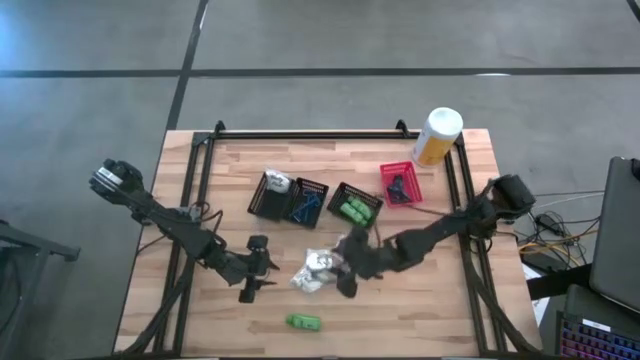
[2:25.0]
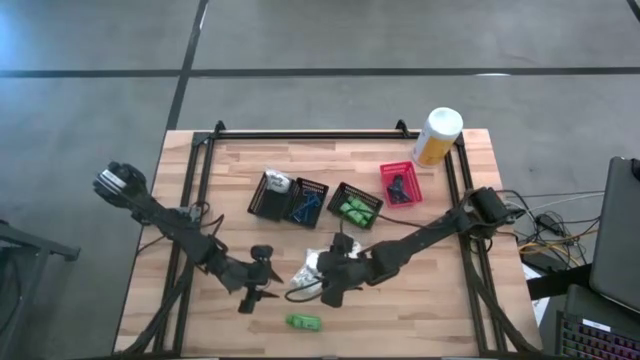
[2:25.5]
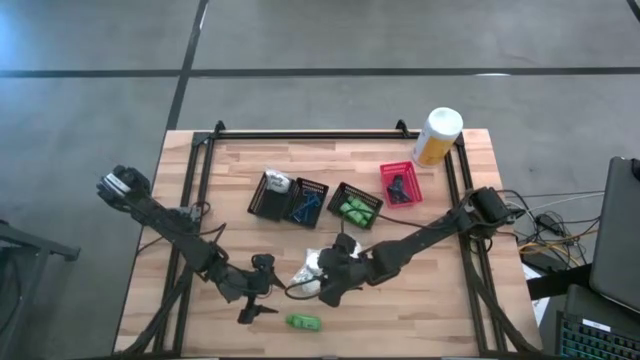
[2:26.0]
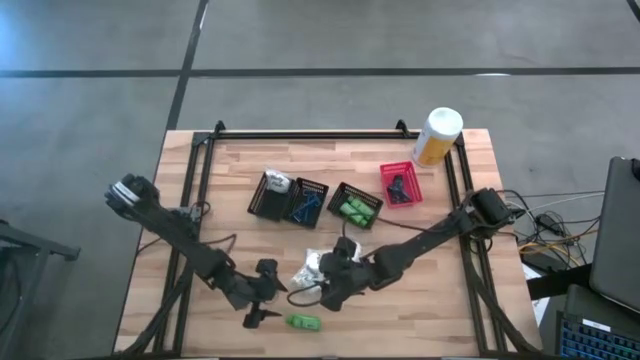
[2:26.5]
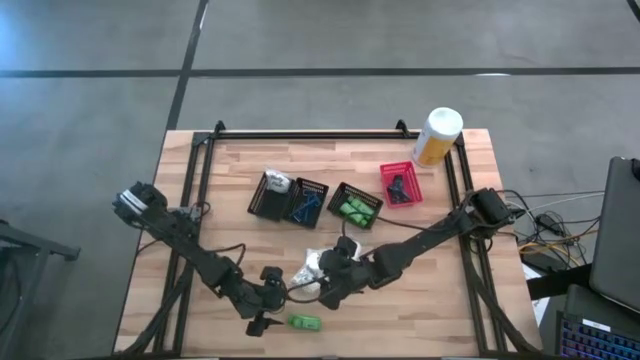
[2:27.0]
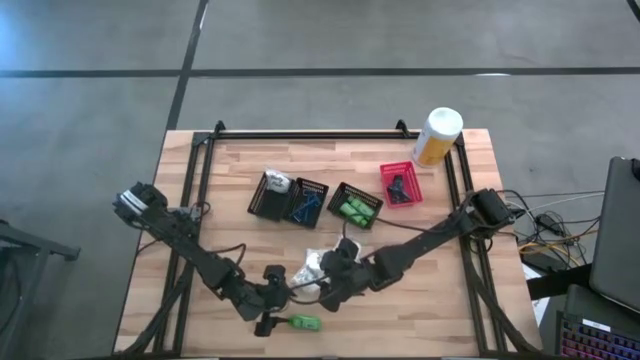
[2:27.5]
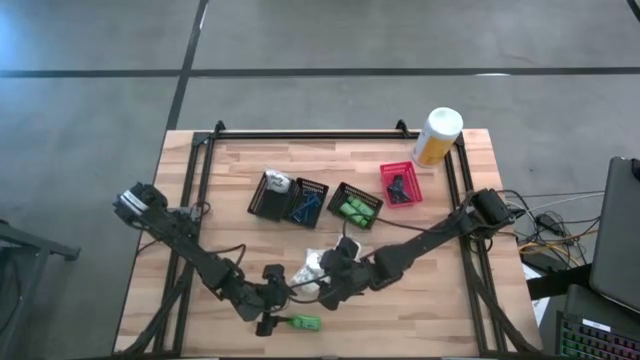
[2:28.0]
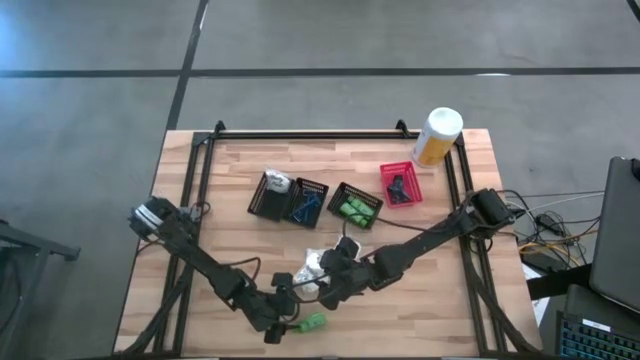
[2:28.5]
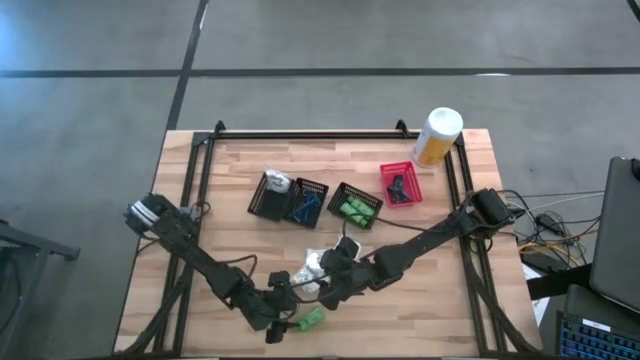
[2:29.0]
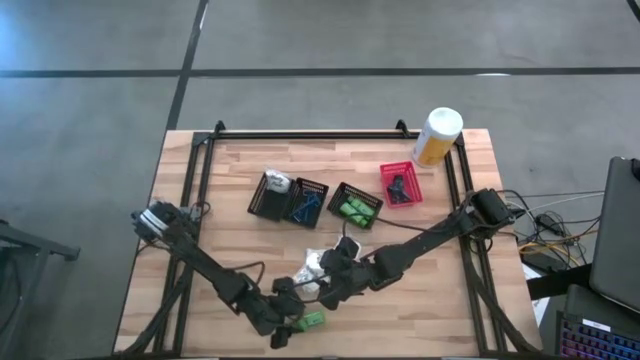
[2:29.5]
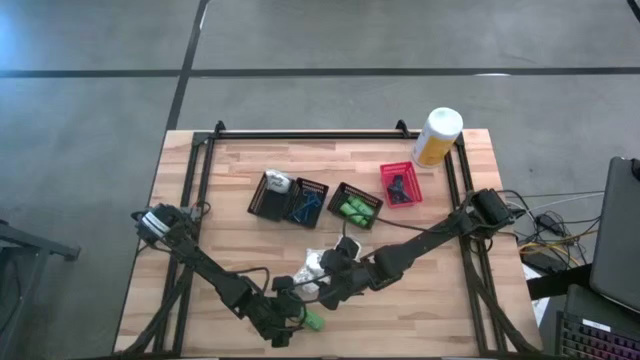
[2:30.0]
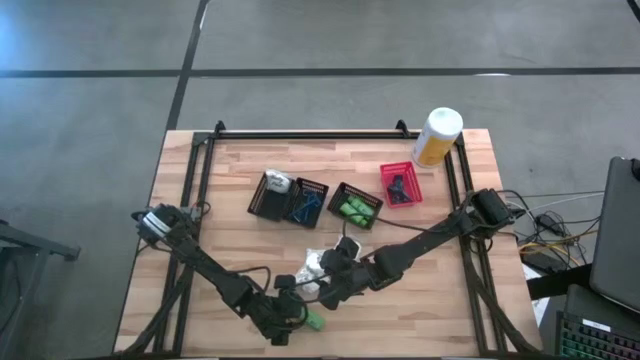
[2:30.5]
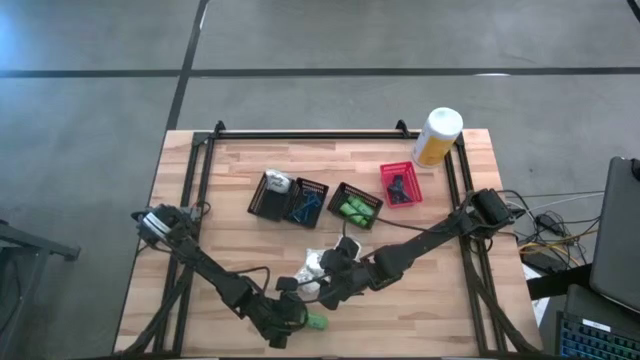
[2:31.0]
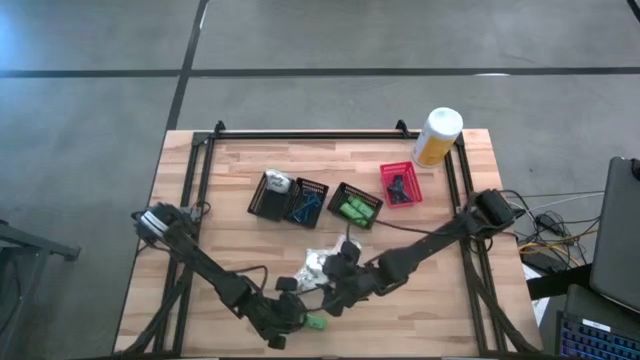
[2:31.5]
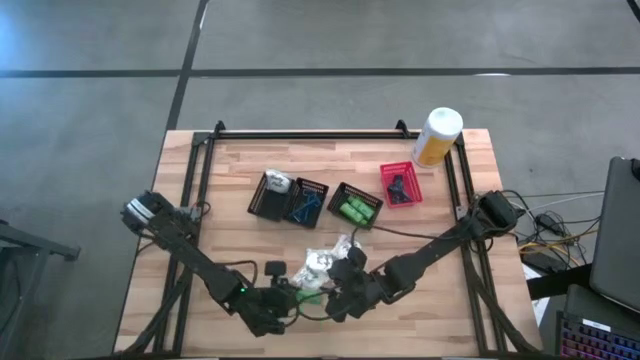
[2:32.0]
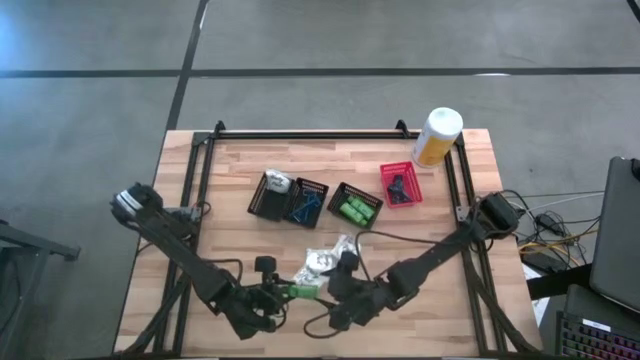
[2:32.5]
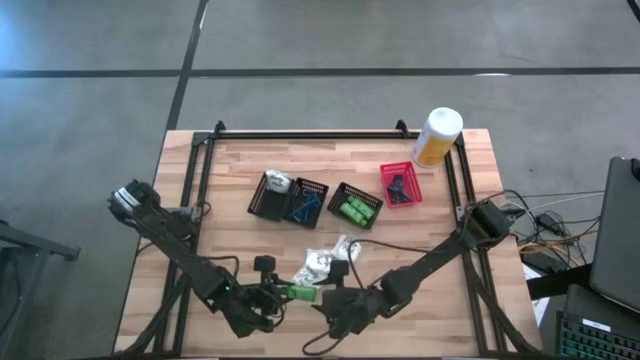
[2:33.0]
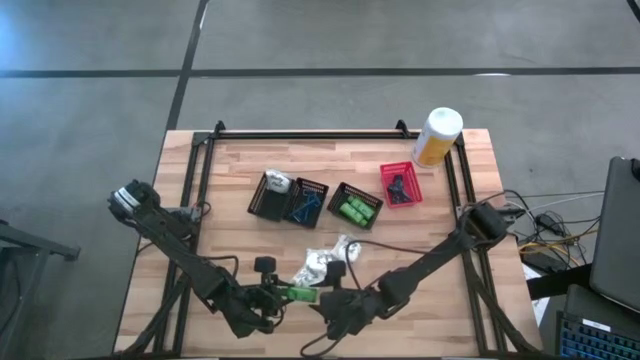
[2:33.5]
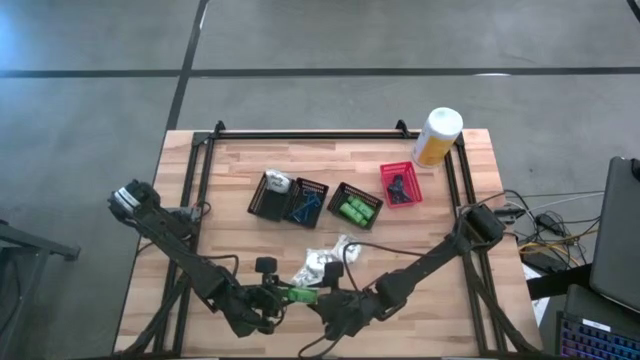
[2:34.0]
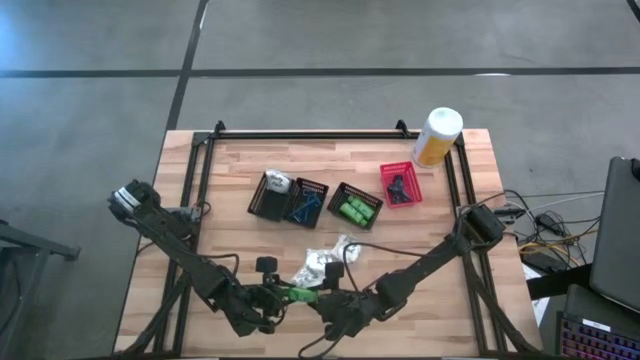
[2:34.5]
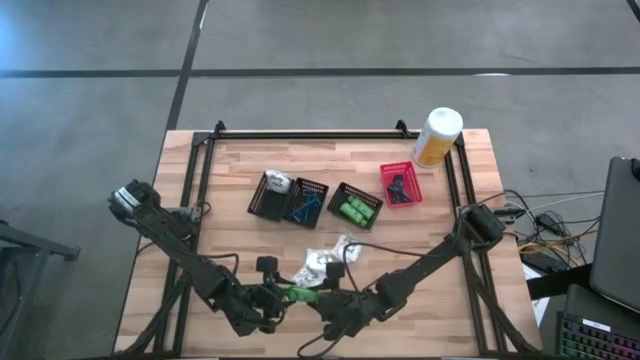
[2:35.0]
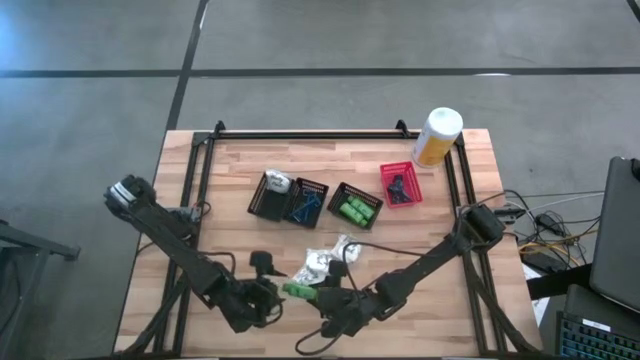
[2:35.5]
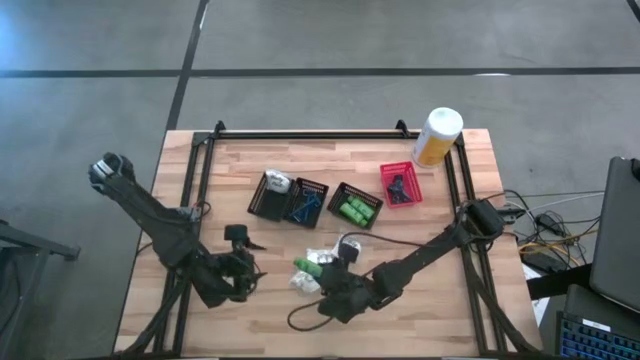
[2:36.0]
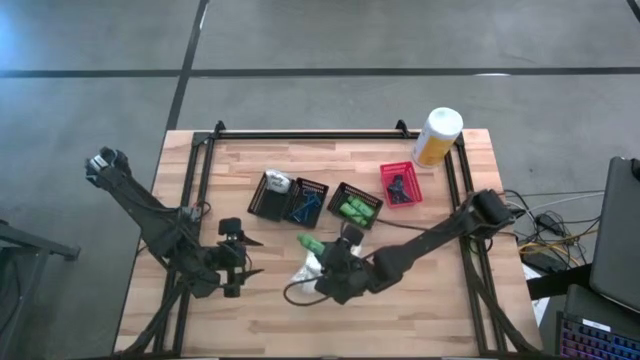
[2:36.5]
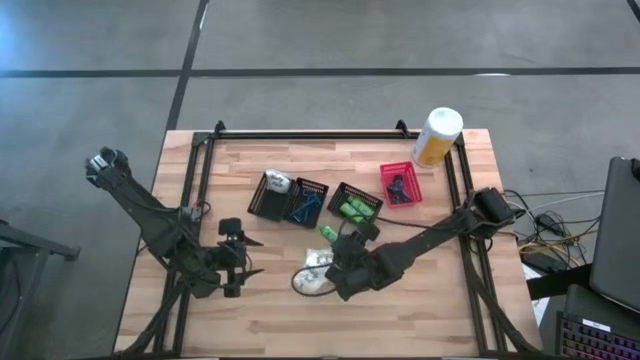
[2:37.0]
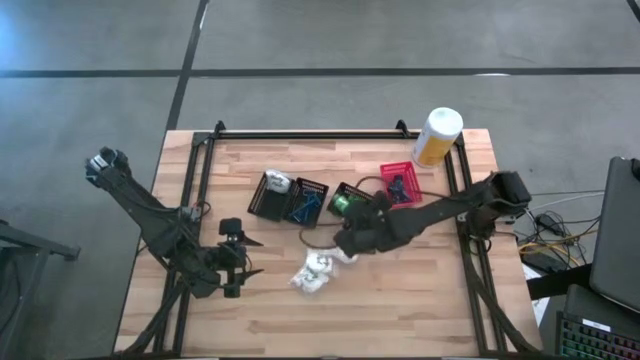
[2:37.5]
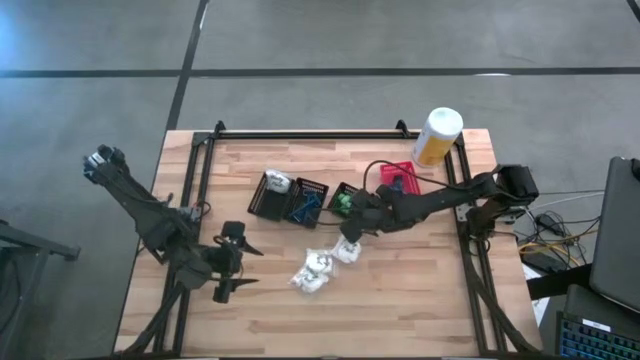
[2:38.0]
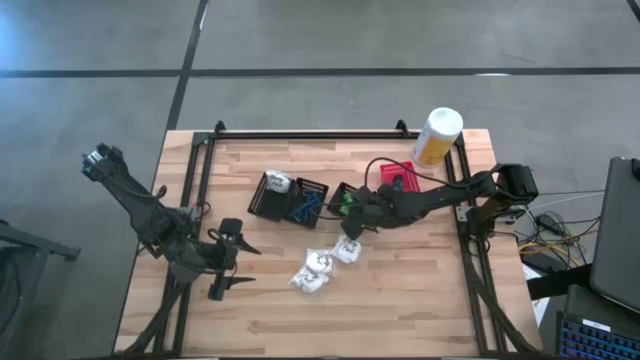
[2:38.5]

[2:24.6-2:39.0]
Task: Pick & Place Travel size toiletries
Put the green shampoo into the right black bin

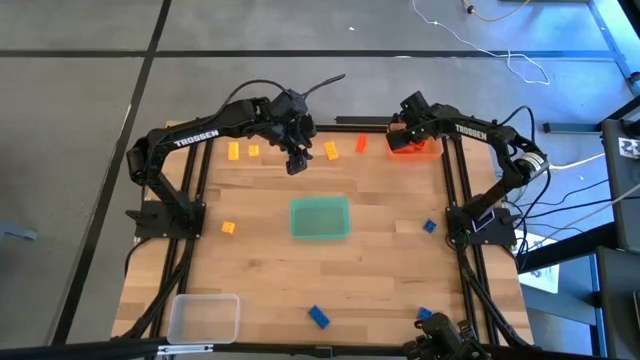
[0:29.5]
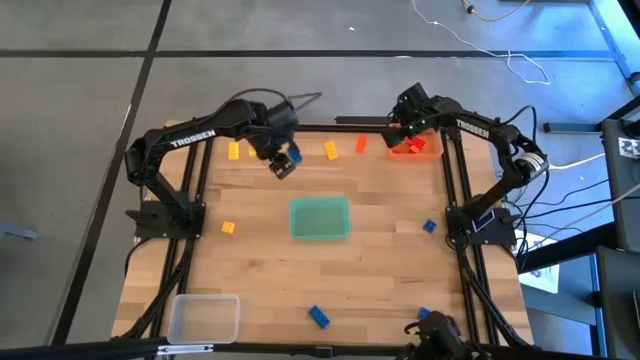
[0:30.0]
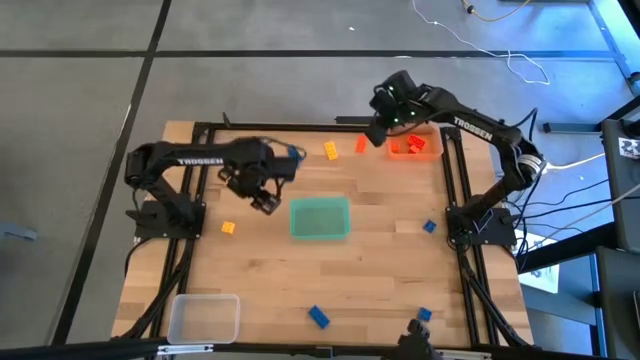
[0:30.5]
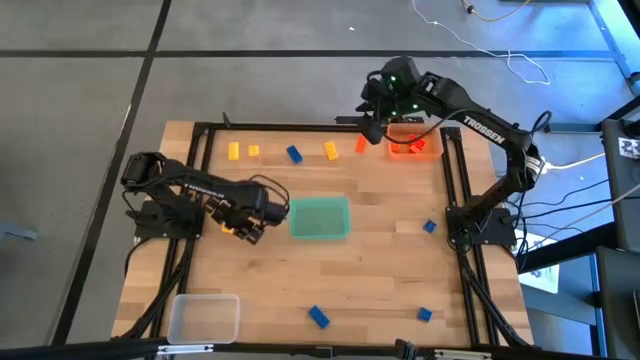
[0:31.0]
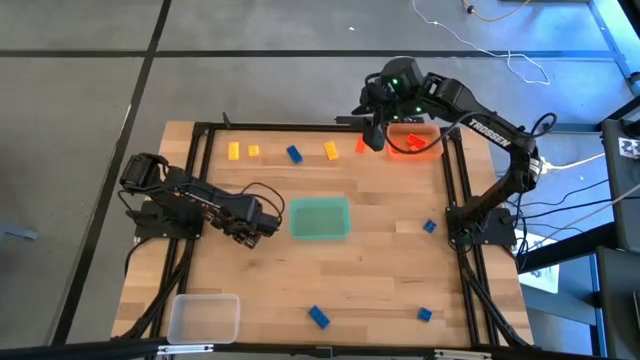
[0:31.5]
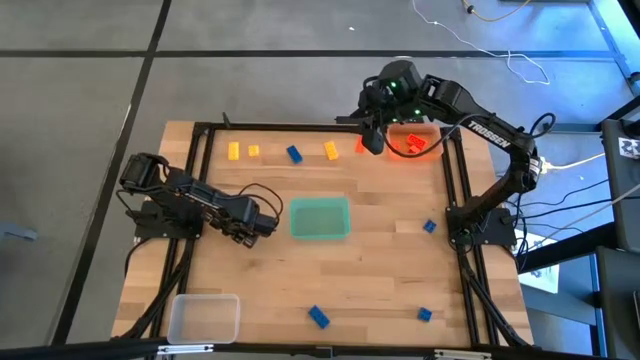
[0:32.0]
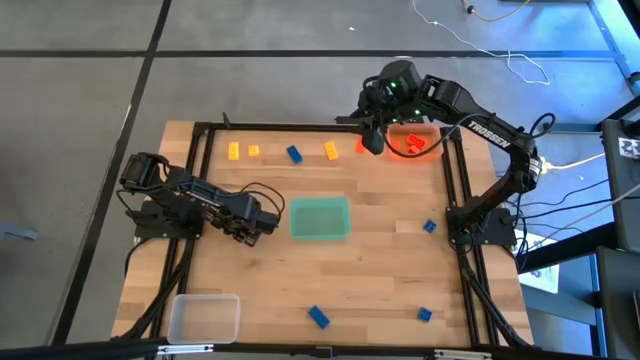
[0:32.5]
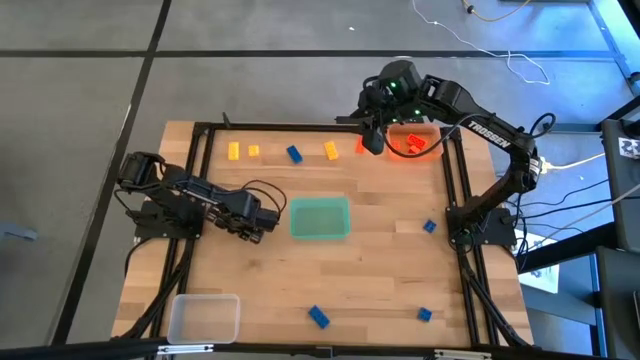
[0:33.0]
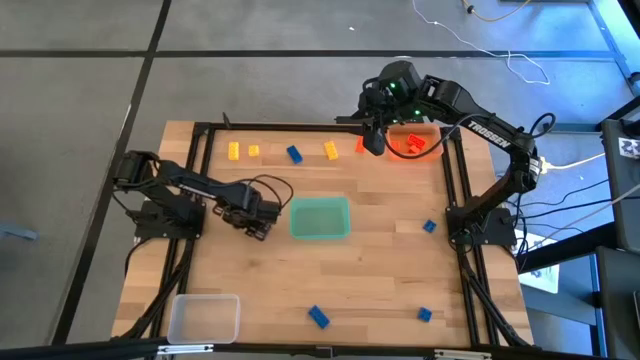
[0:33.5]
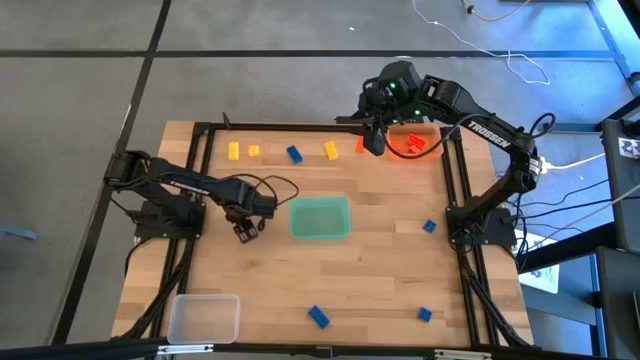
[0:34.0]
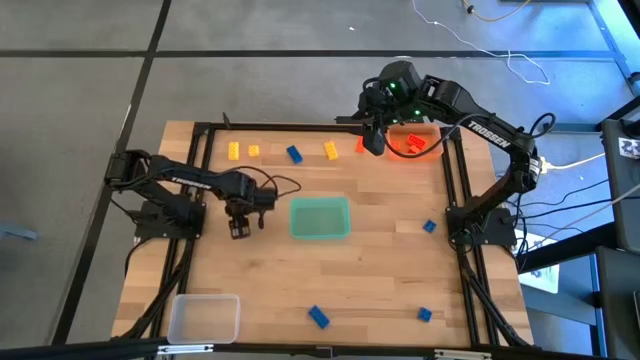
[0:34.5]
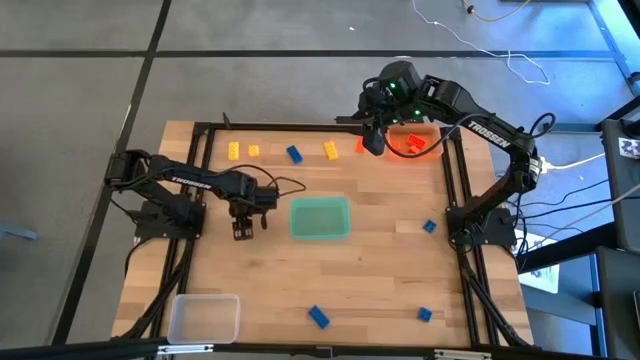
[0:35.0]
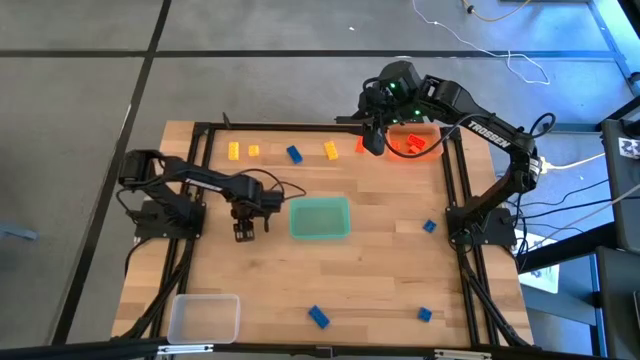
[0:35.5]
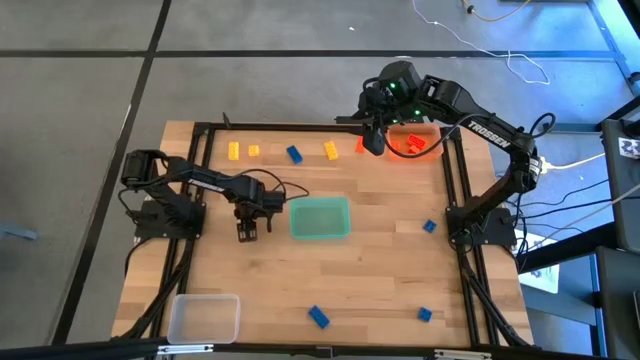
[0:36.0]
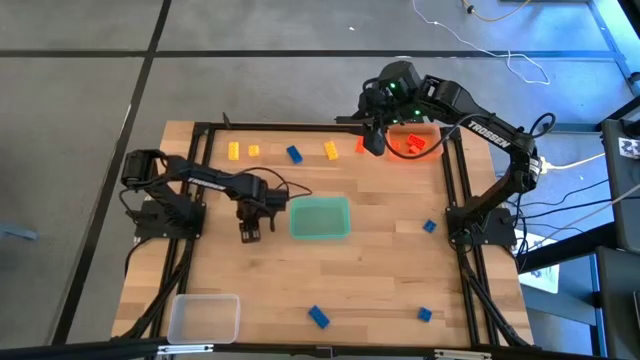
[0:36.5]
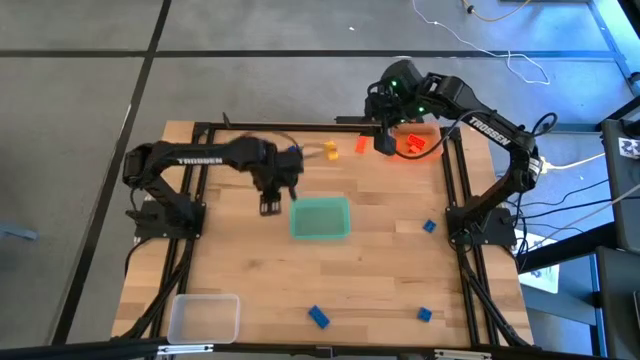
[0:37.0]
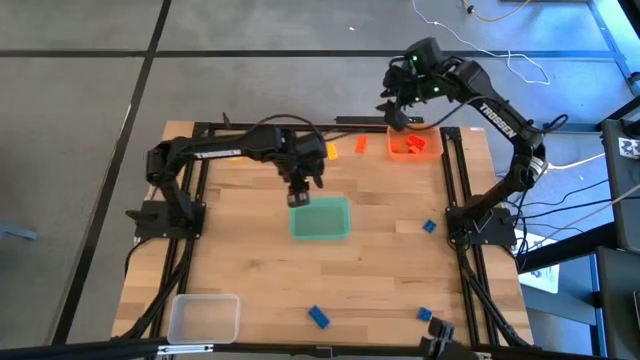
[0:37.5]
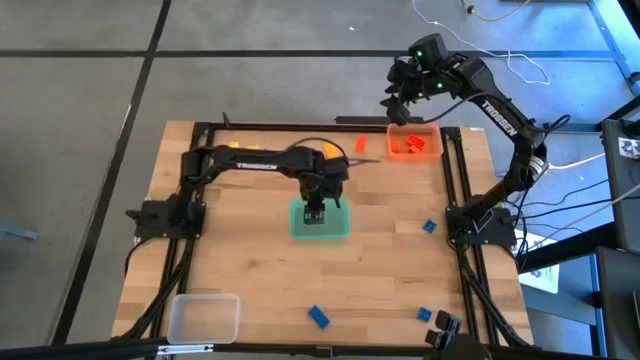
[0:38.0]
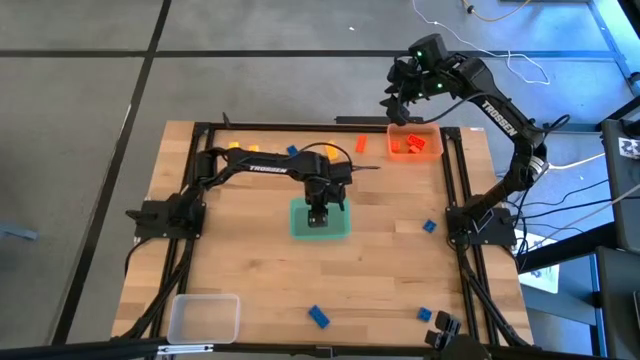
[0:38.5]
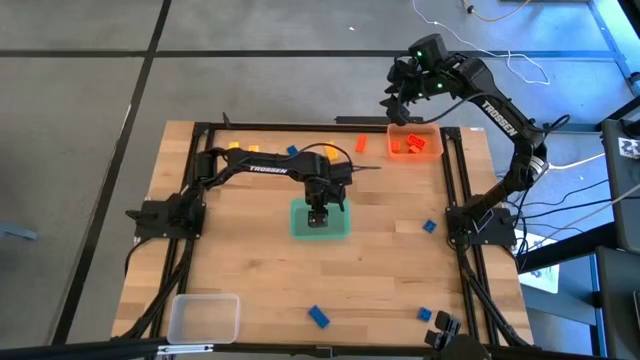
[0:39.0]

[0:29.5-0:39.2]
Task: Sort & place blocks by color
Put the yellow game piece into the blue bin
